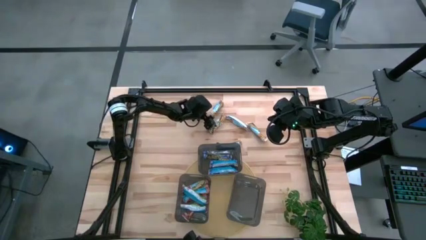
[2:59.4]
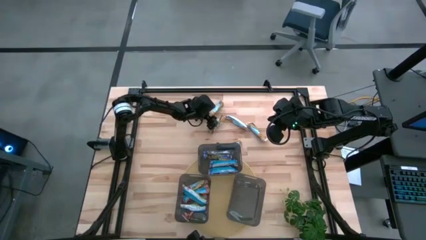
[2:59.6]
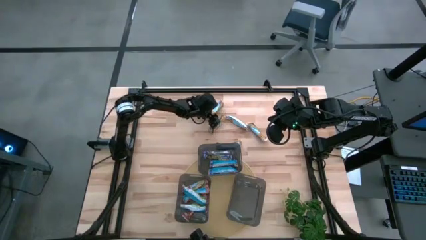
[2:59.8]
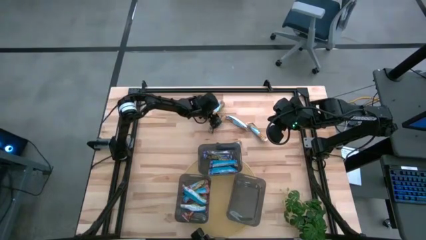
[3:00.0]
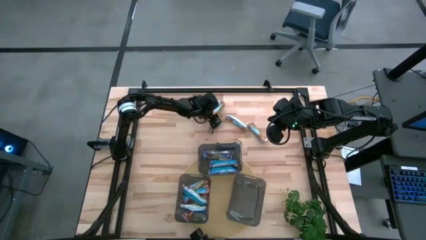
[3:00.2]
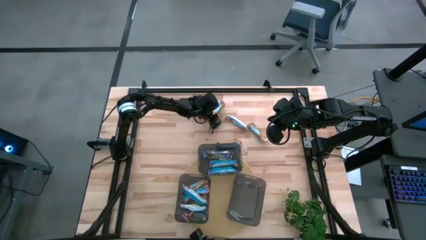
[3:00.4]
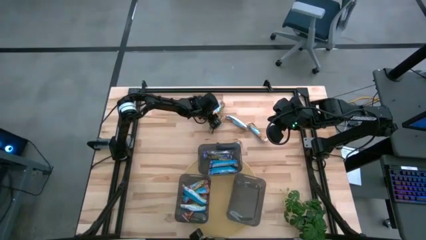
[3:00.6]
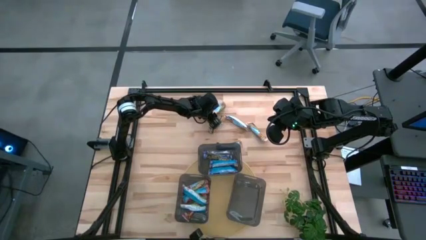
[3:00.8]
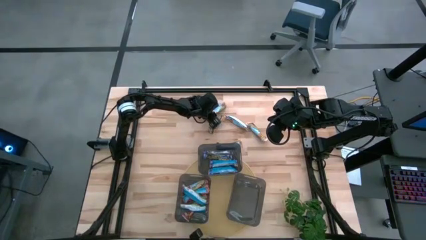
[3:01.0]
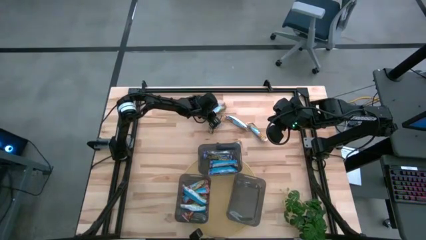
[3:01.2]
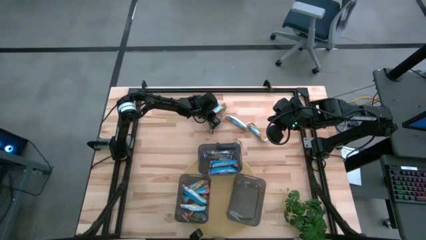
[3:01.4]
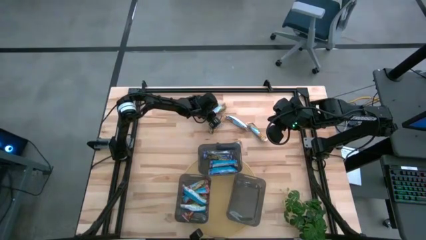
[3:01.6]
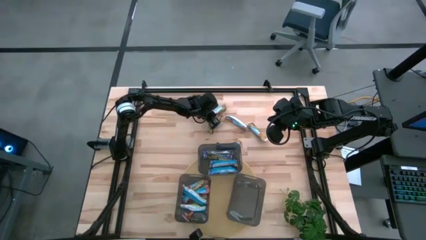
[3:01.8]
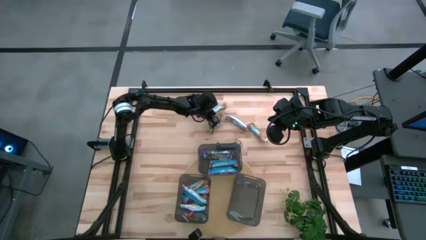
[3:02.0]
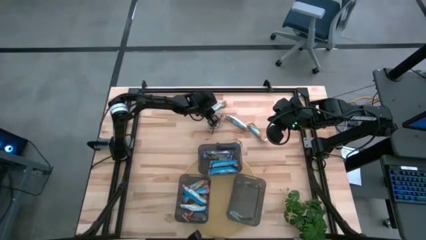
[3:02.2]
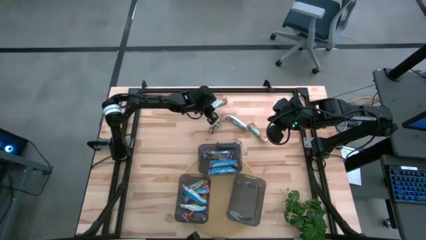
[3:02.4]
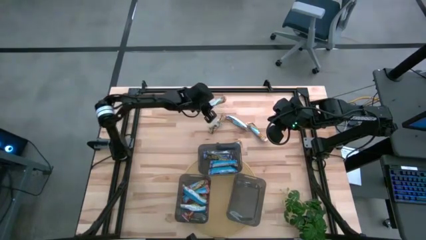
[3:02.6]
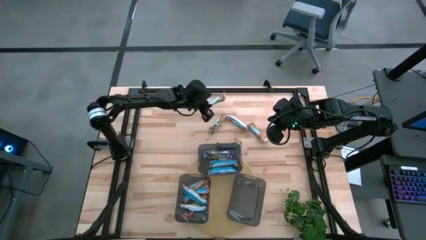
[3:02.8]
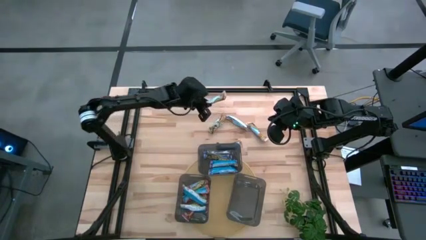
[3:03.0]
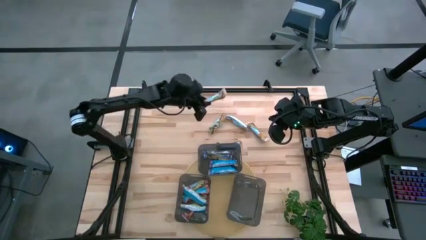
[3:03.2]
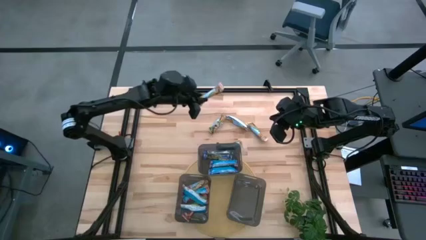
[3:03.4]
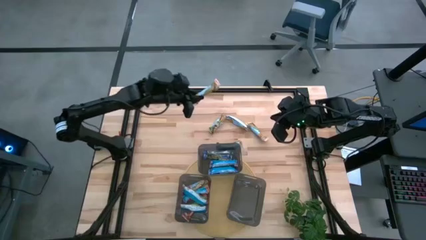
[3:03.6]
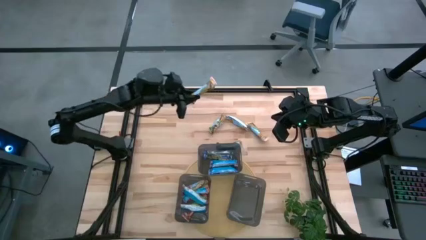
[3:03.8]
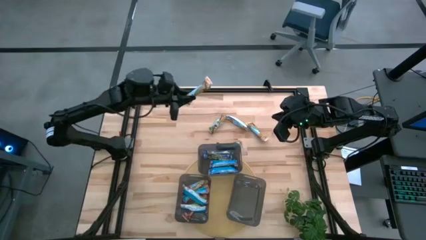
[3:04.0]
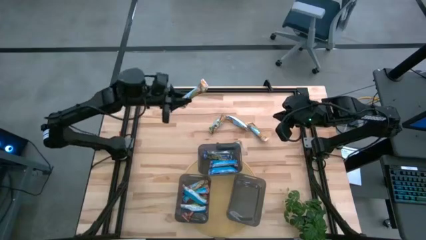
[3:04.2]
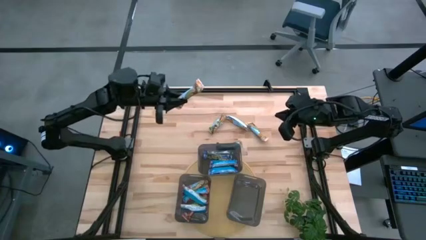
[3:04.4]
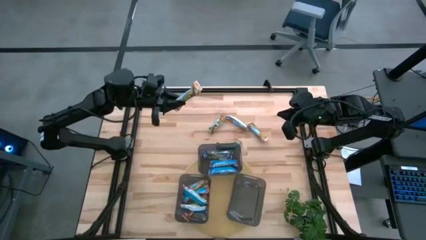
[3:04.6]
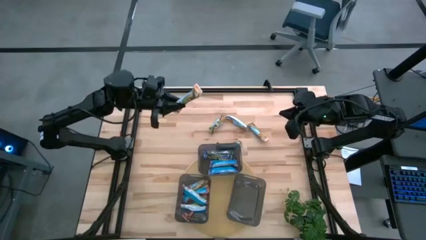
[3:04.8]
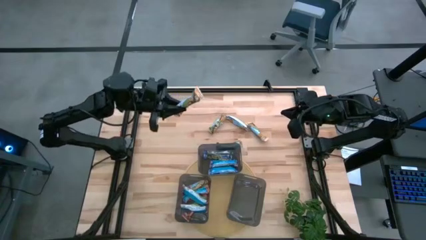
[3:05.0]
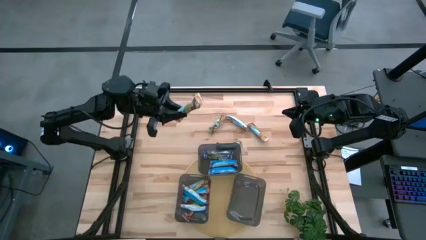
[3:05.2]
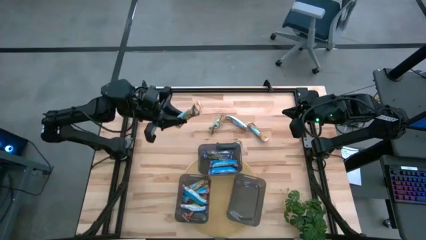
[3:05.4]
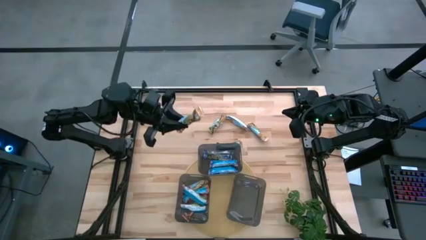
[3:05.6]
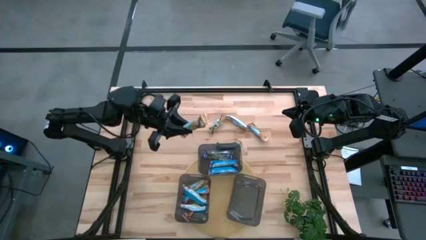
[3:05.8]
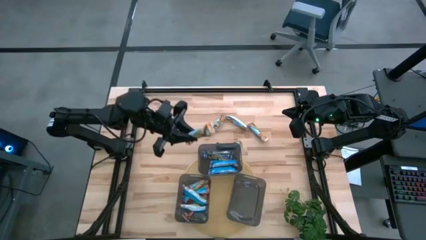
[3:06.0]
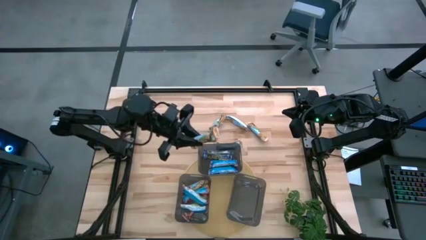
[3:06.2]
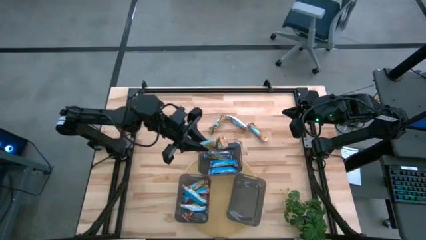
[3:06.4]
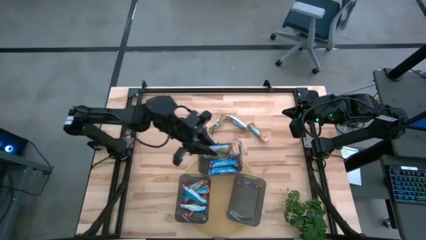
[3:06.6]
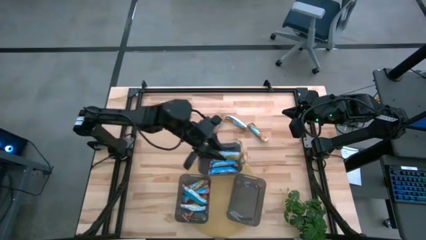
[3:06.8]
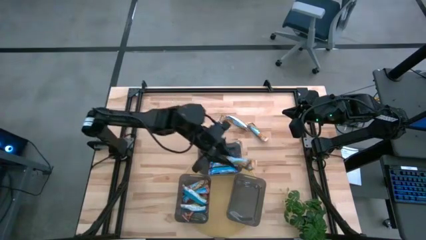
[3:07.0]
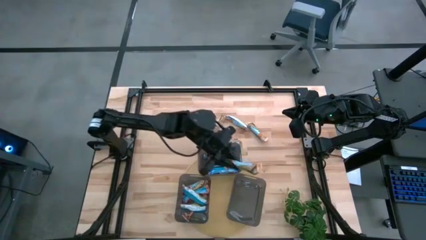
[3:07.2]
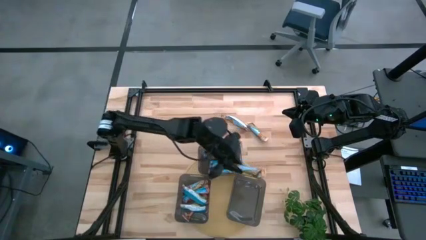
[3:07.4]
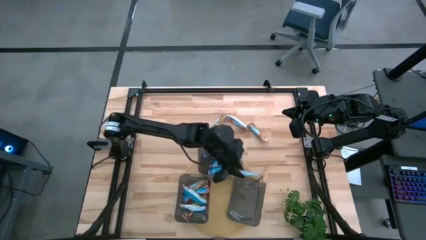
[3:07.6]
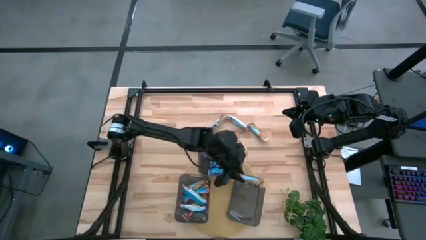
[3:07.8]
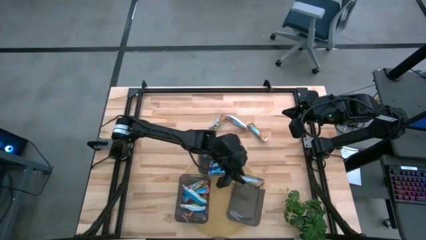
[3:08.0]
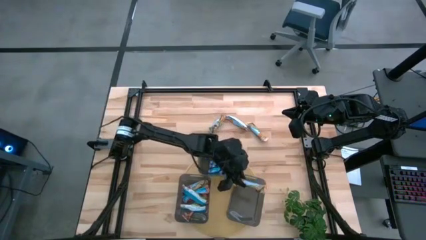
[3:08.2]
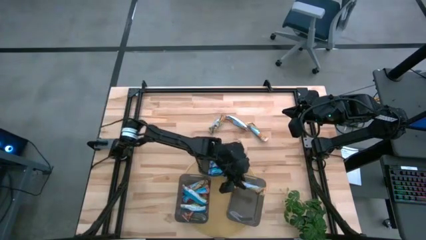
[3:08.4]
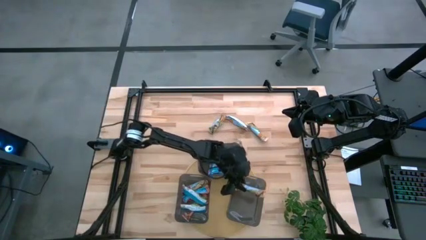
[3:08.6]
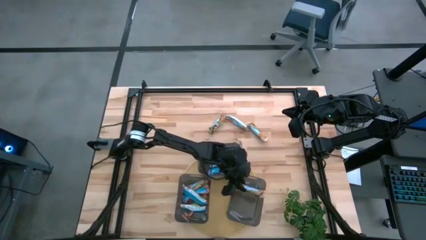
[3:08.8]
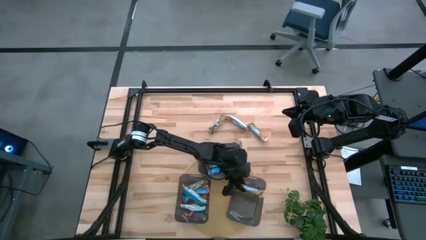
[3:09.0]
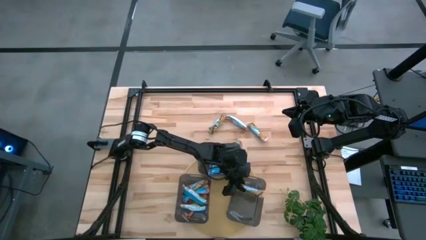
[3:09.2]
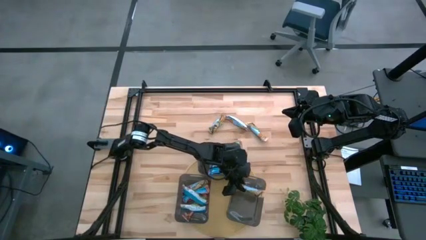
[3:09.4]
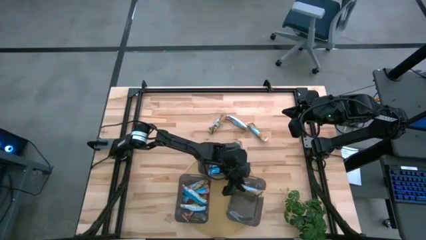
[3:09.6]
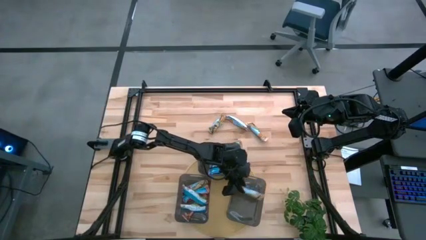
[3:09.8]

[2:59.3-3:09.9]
Task: Pick and place Granola Bars by type
Put the yellow granola bar into the bottom right black bin

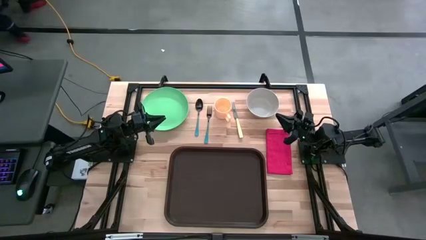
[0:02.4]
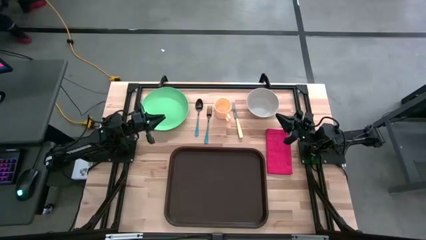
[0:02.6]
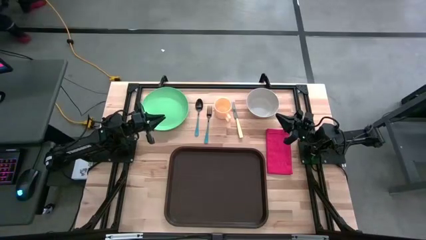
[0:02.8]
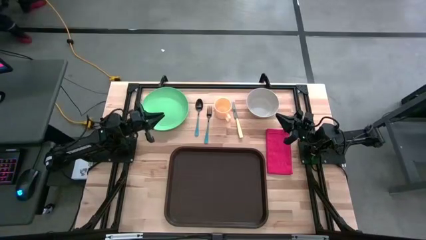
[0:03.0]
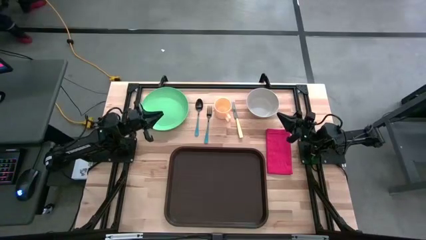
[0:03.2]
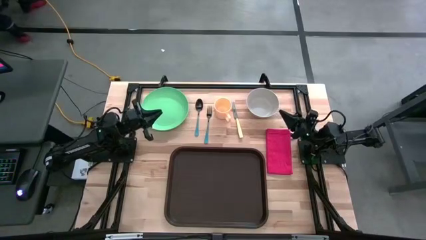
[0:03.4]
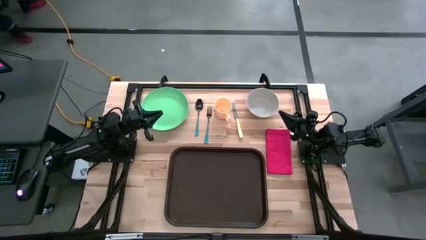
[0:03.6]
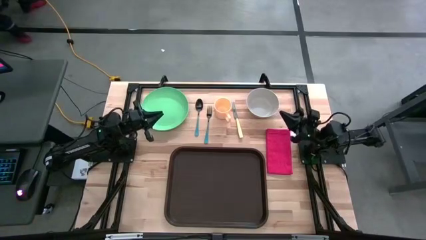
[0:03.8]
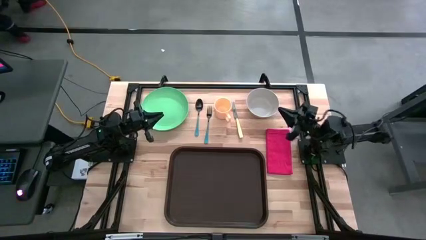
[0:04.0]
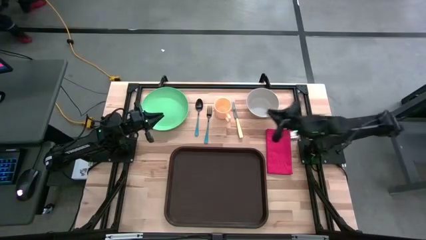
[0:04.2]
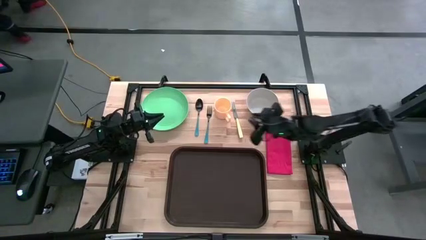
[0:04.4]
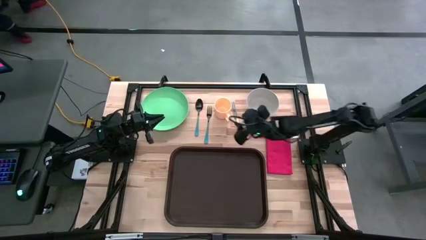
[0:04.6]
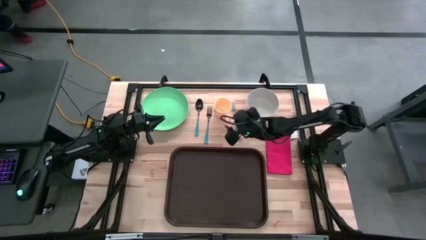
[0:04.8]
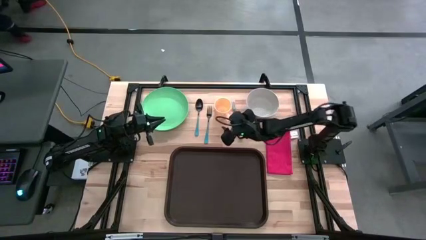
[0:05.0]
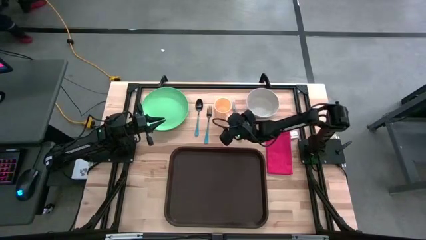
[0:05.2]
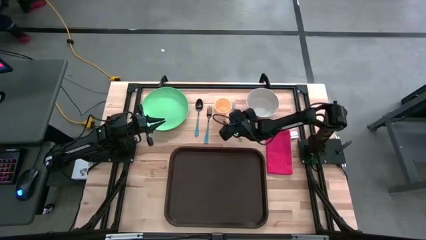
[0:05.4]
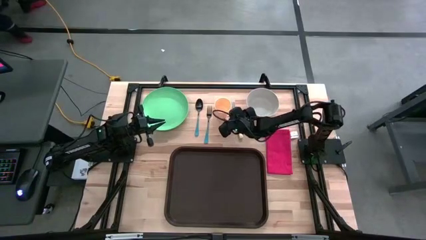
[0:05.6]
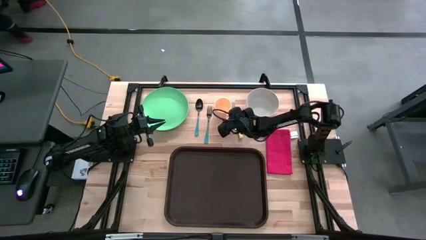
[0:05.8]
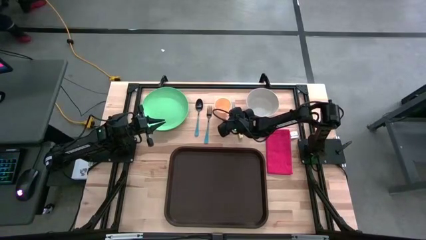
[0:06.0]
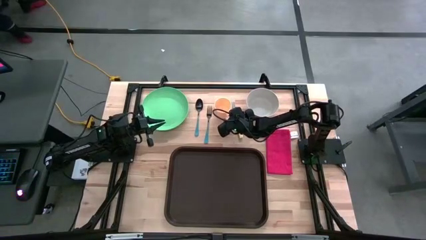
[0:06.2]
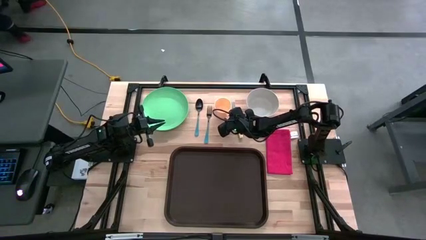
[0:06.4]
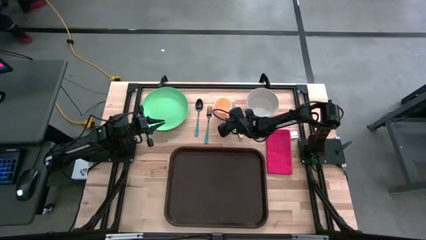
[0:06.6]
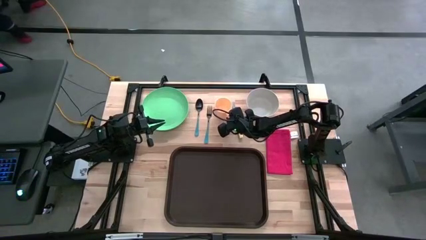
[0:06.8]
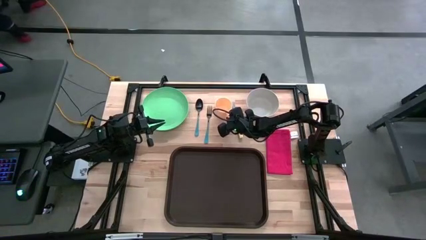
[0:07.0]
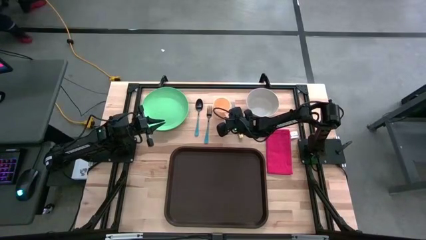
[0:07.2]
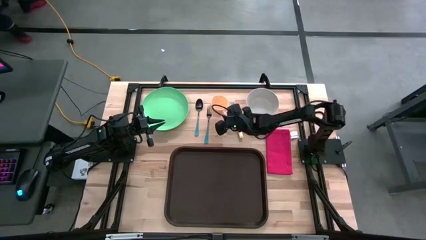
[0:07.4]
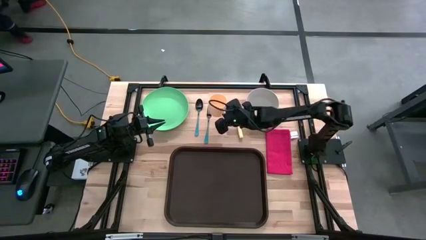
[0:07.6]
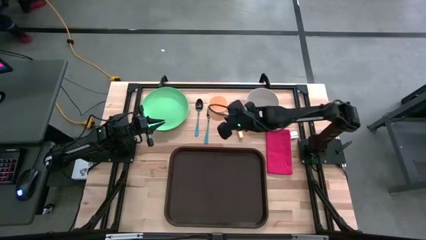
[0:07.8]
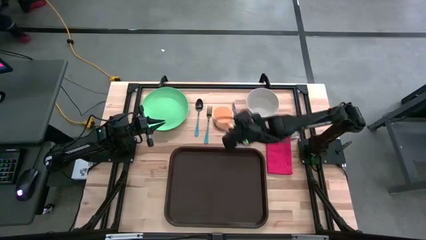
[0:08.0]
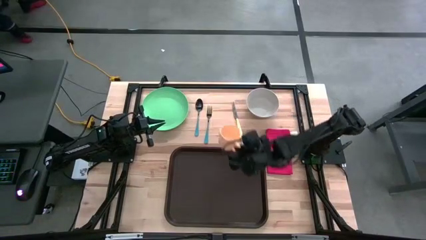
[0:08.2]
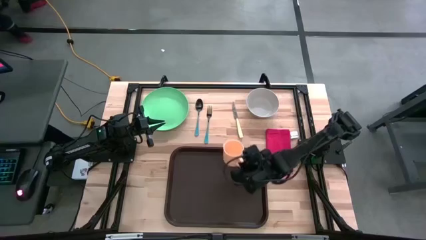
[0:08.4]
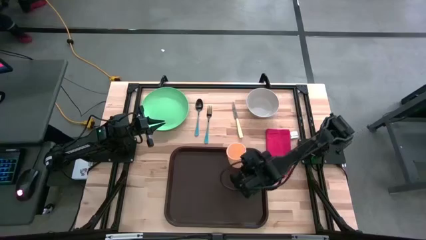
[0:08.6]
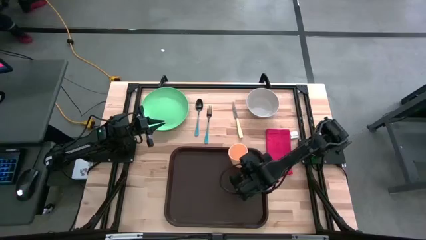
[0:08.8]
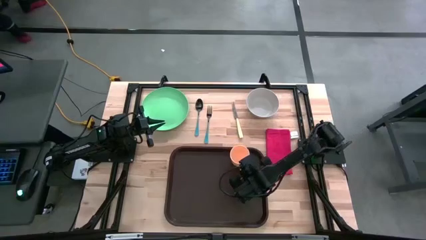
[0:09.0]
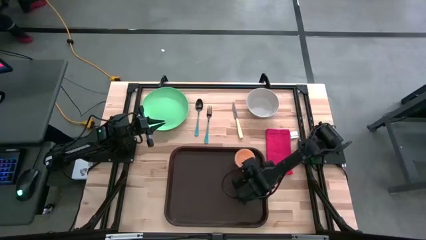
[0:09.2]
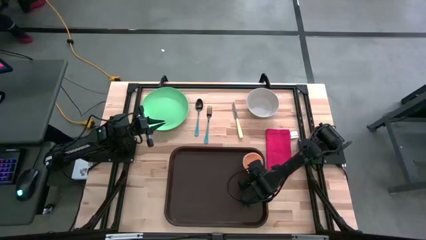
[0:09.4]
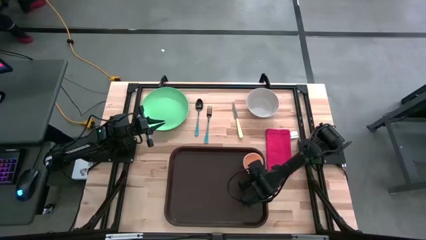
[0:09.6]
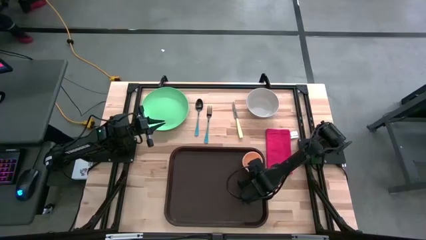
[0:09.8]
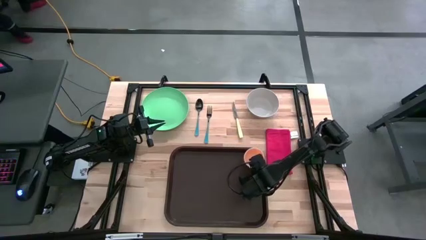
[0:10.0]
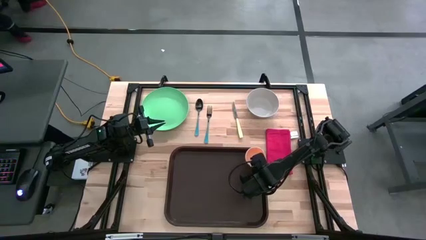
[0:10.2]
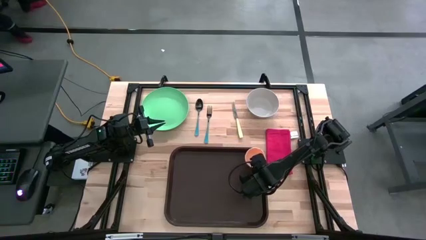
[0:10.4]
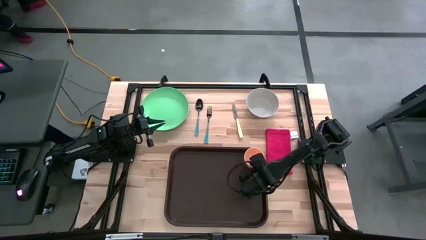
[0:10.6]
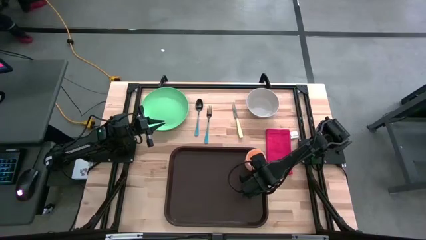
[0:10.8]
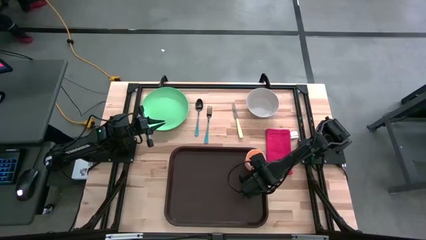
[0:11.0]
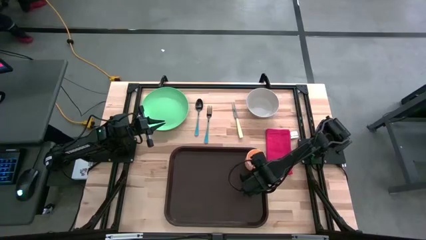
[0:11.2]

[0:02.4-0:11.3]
Task: Set up tray
Put the orange mug on the top right of the brown tray
